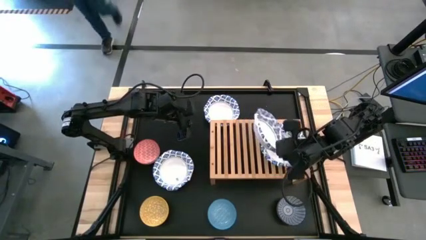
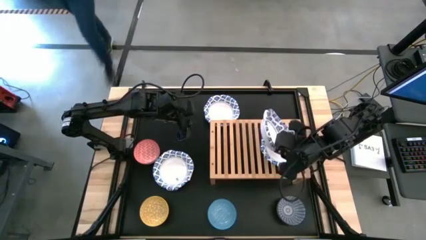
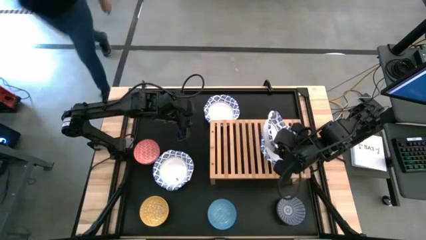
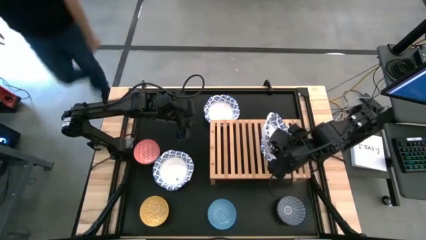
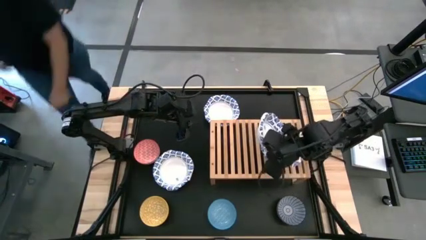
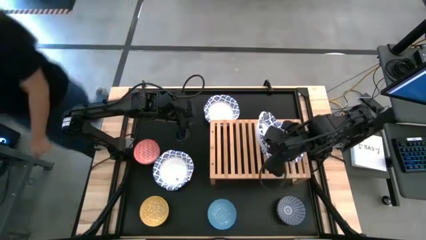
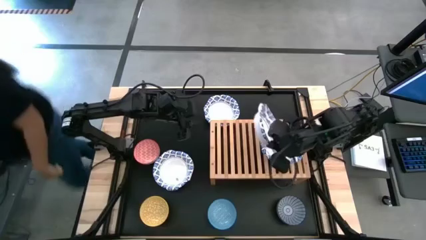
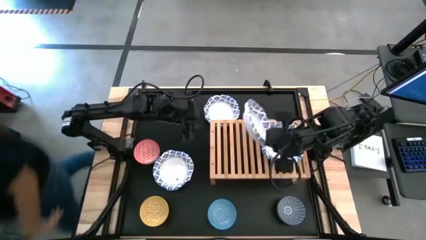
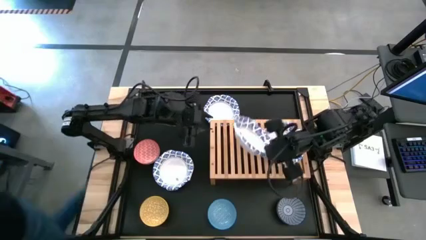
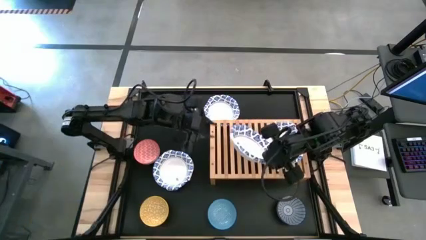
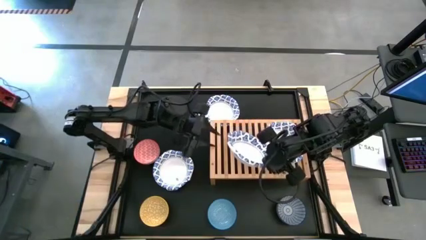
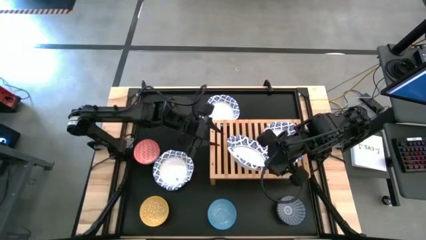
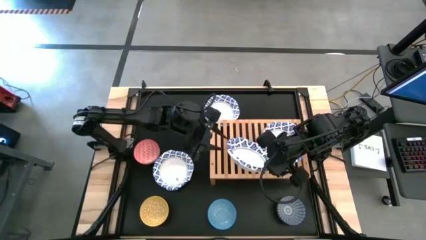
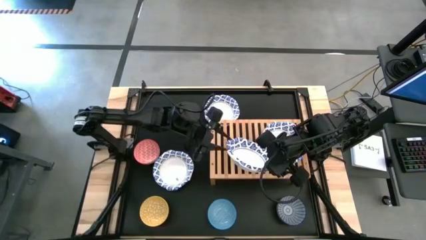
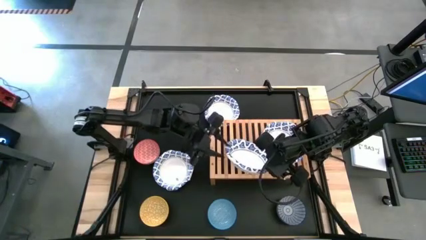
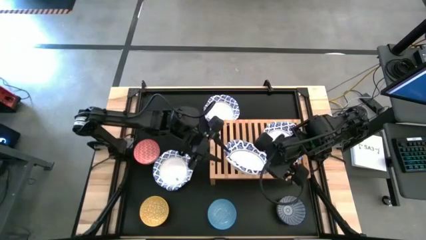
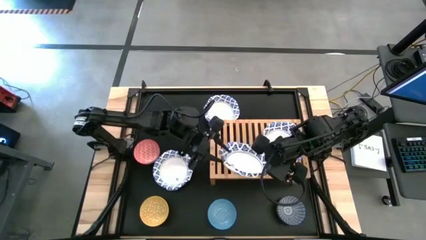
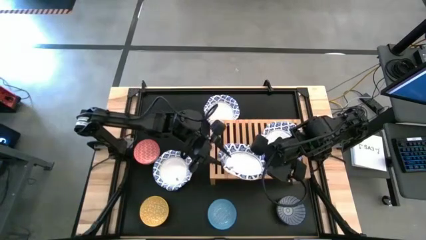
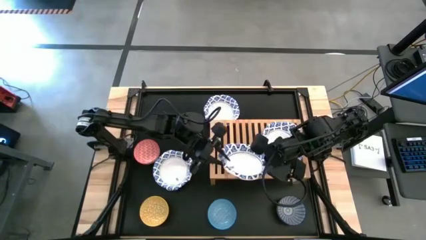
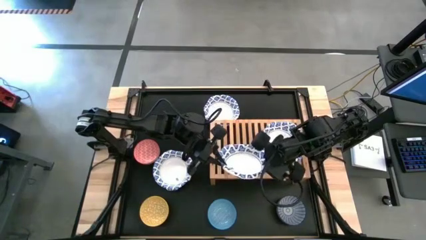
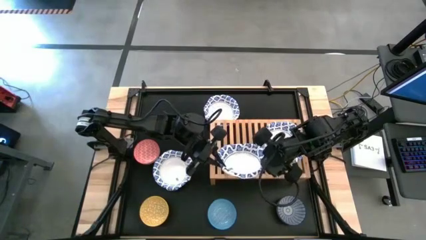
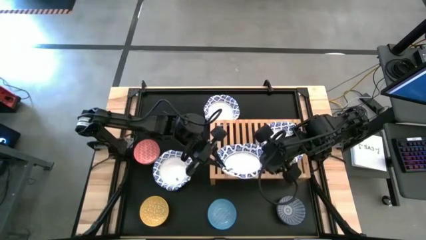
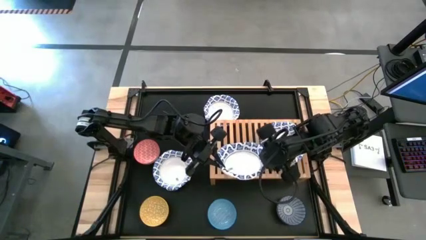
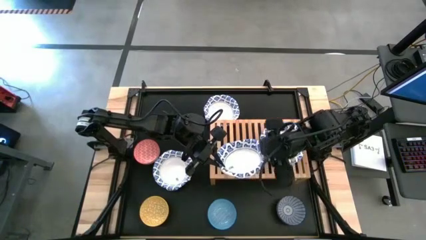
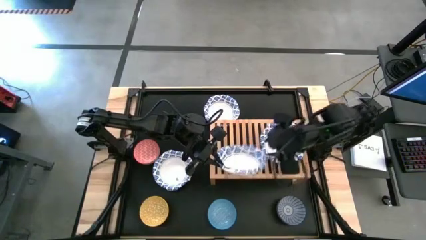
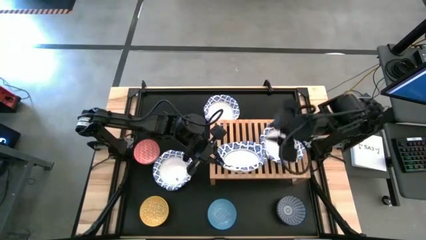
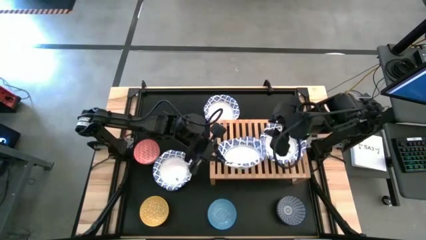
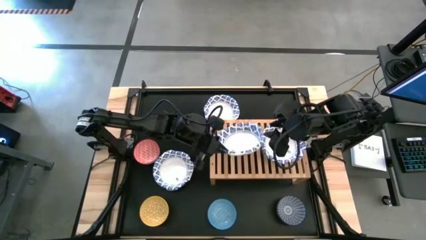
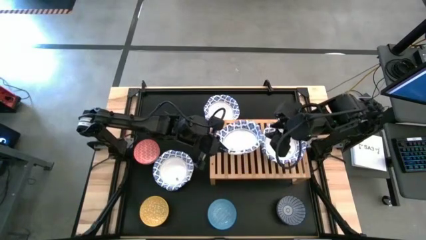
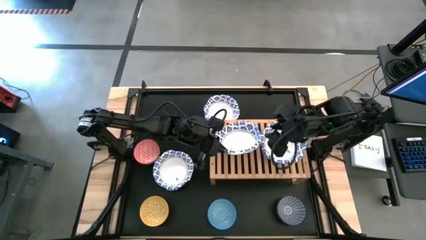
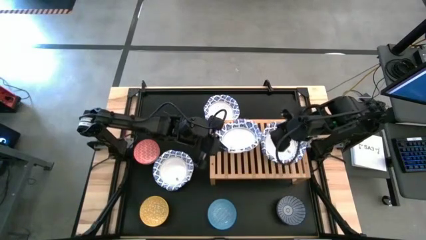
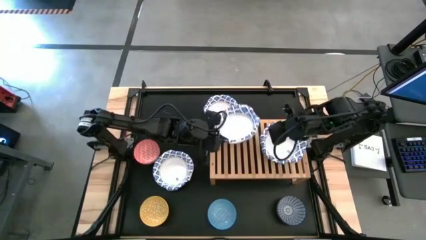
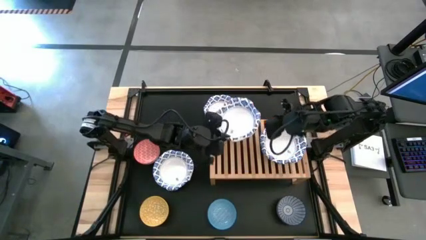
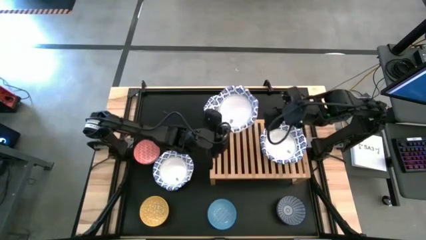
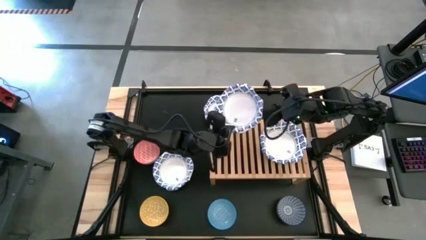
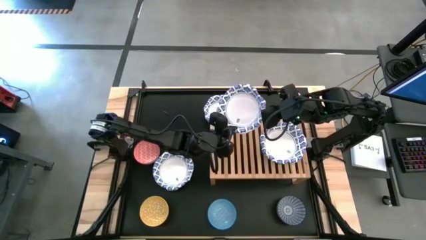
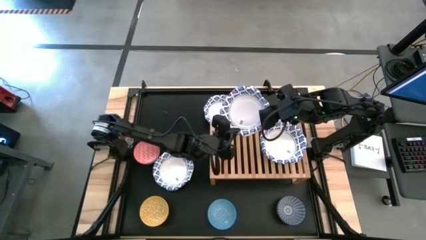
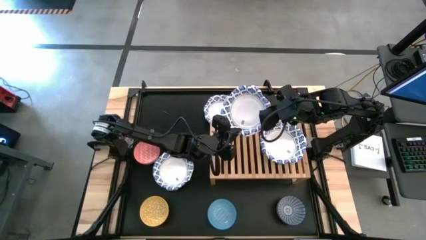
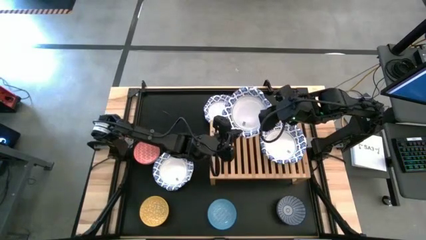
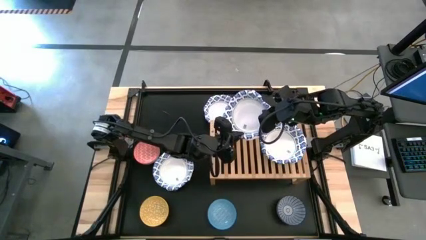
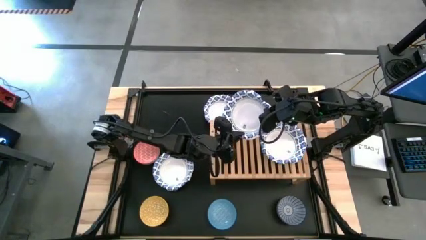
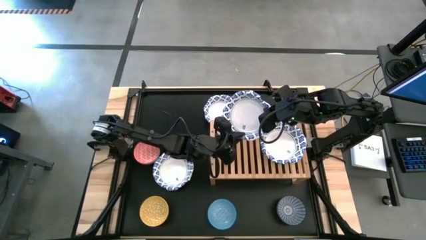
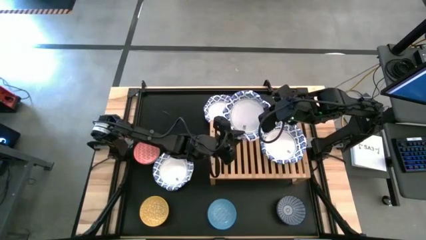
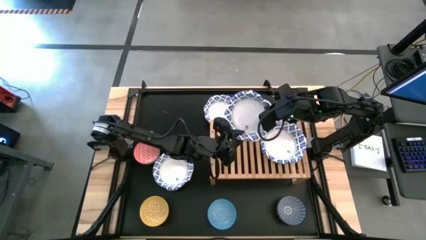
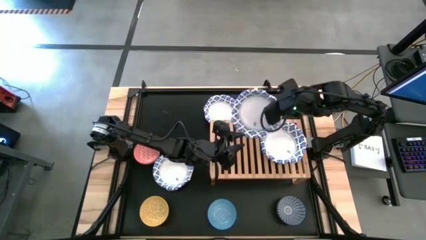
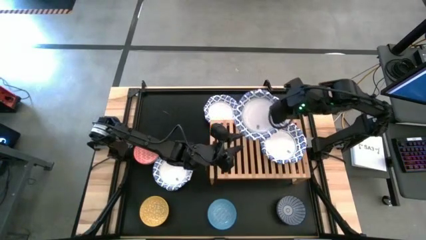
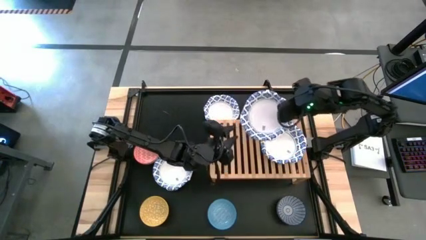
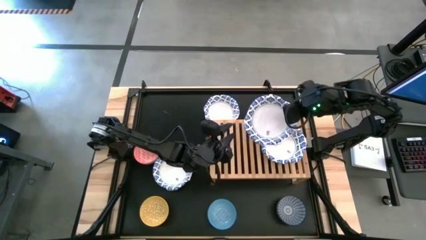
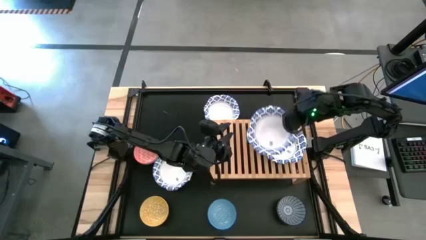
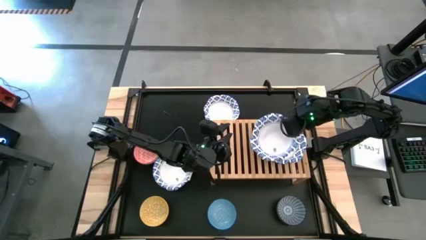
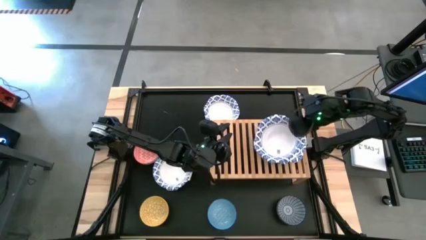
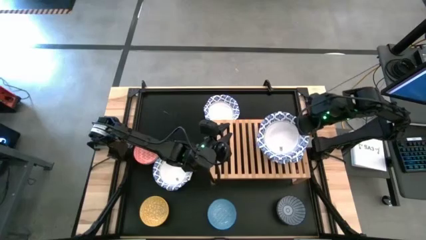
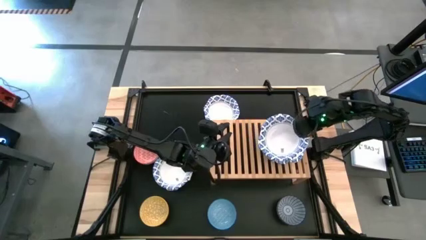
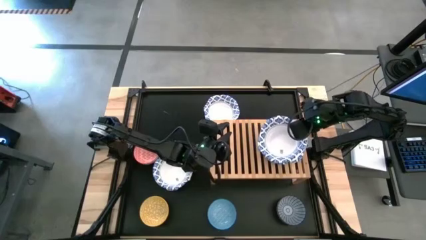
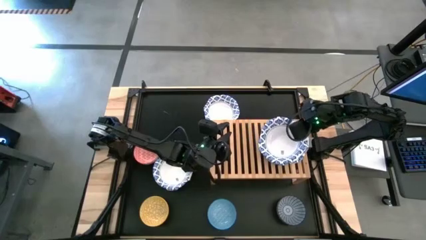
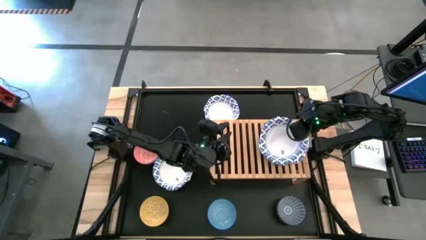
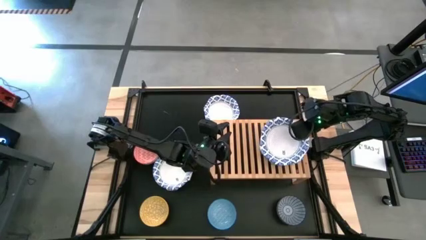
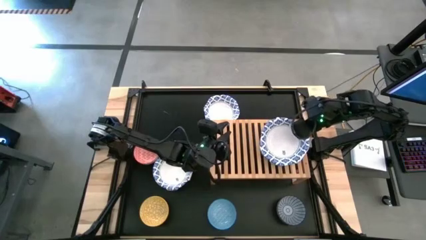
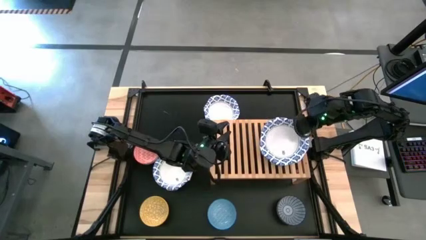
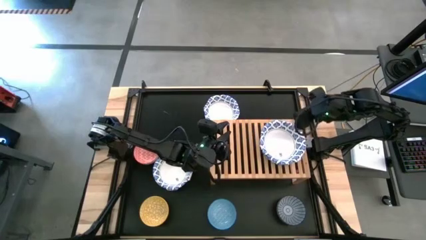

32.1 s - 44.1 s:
Task: Place and stack bowls onto a shelf
Stack the top right big white and blue bowl on top of the big white and blue bowl

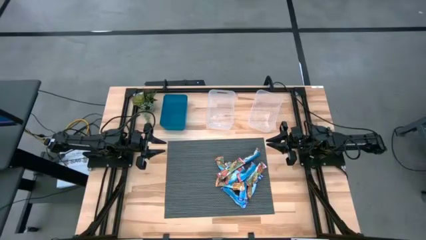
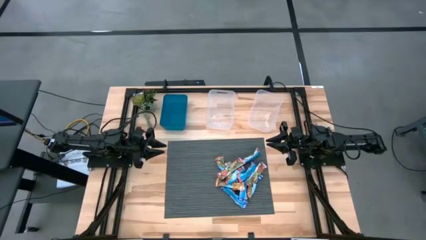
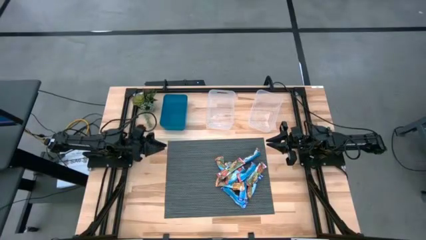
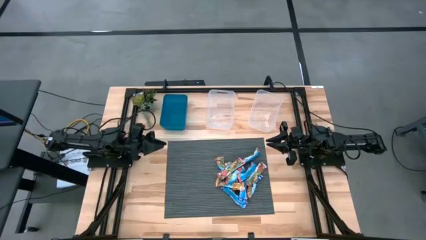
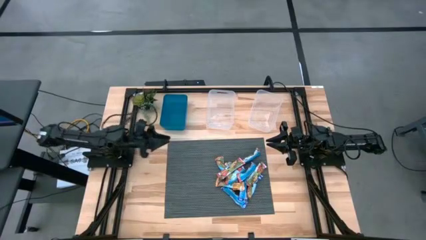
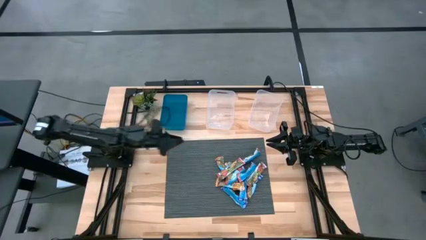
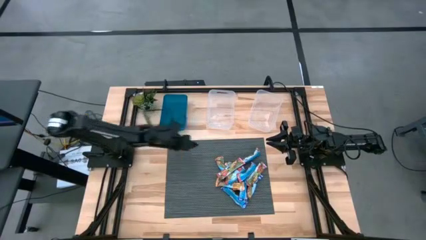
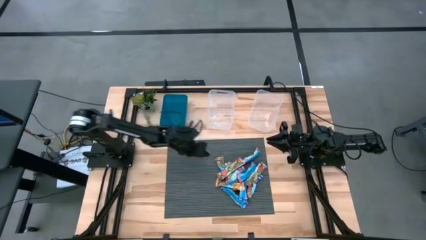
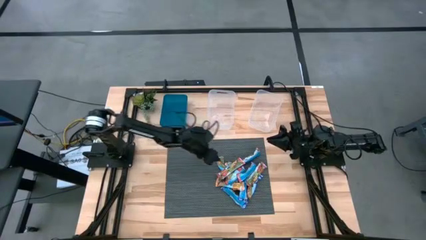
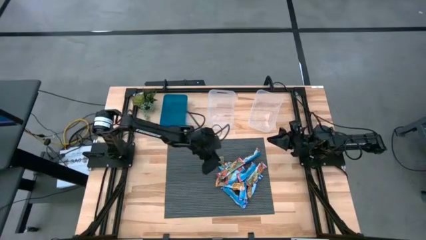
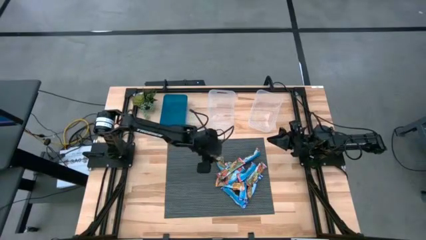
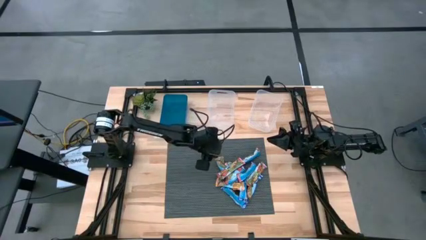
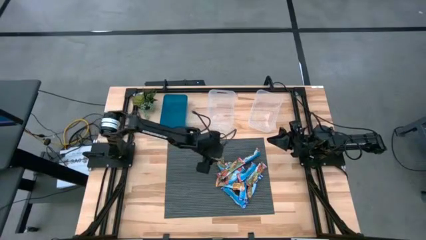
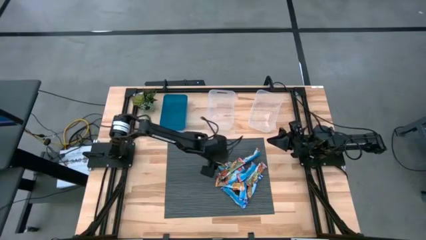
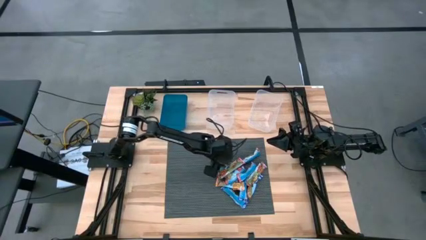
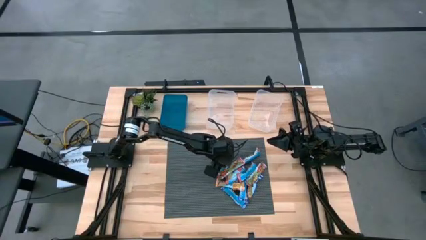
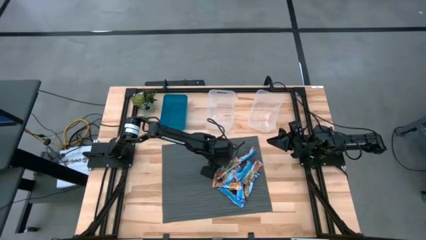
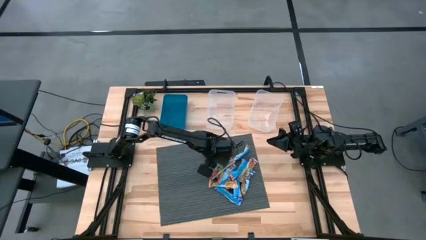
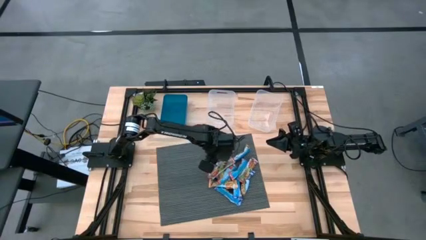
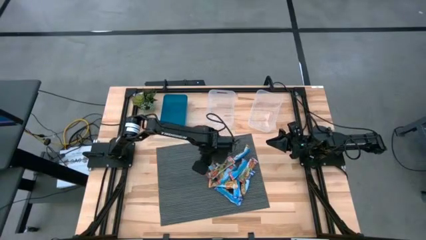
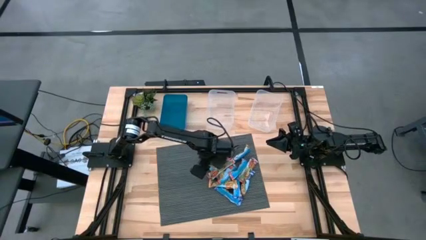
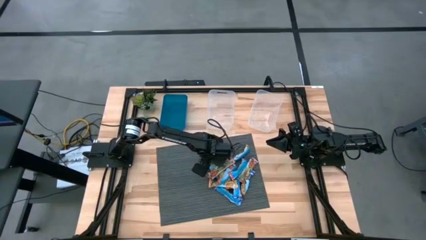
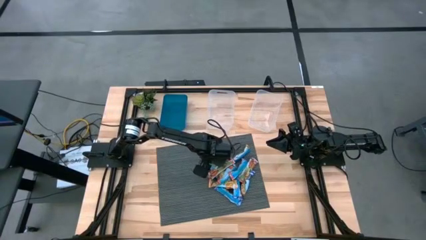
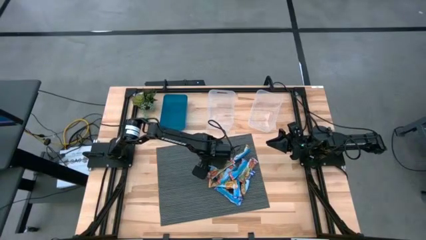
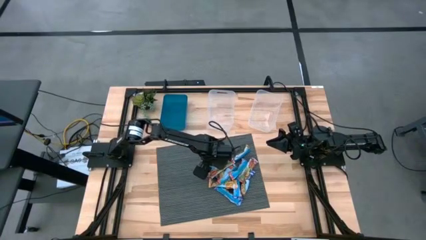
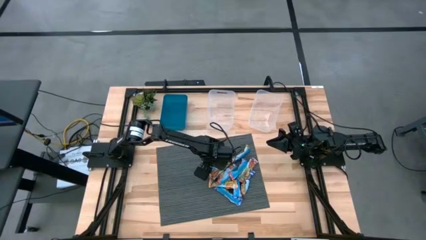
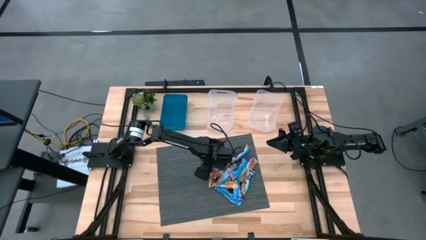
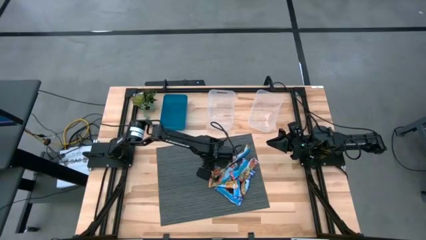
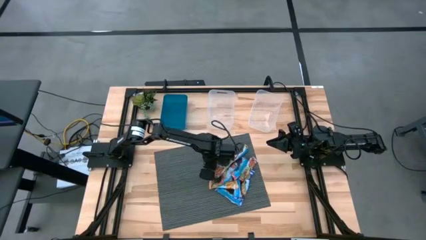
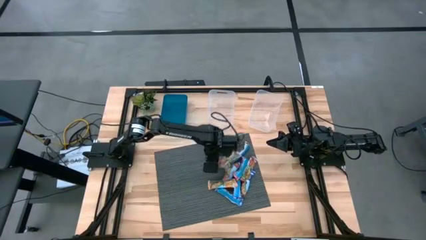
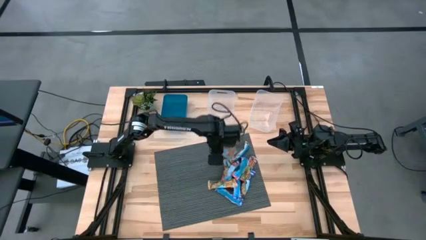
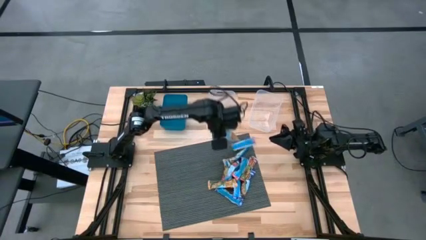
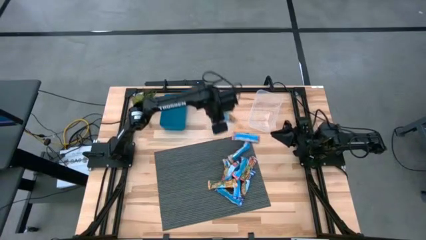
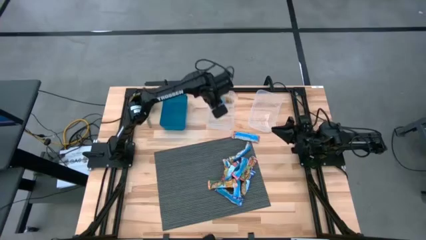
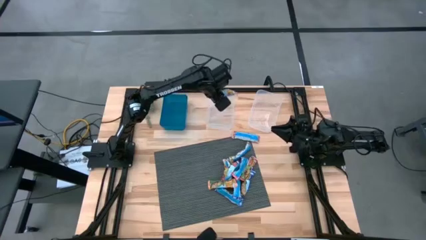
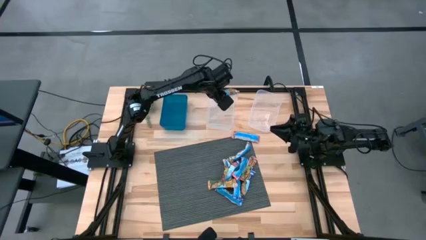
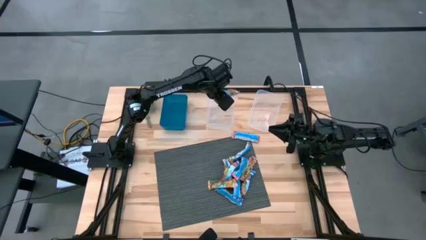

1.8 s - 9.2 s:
Task: Pick and place Granola Bars by type
Put the yellow granola bar into the left transparent bin
